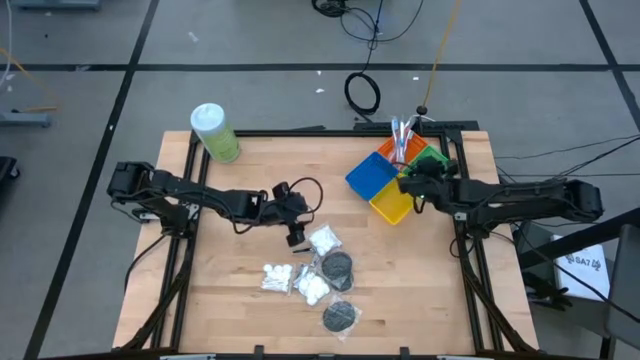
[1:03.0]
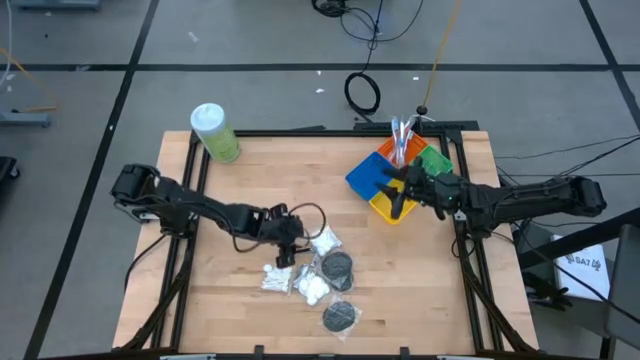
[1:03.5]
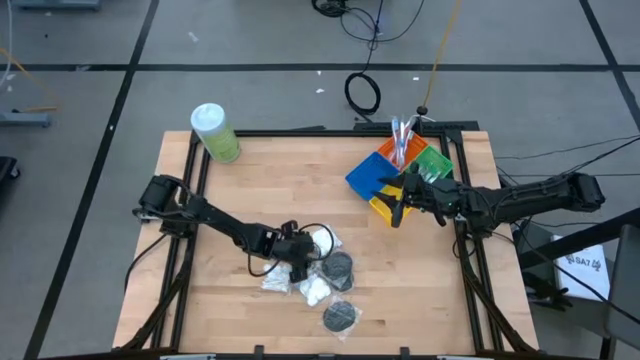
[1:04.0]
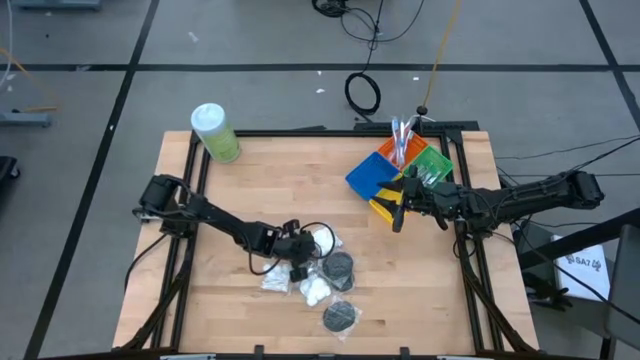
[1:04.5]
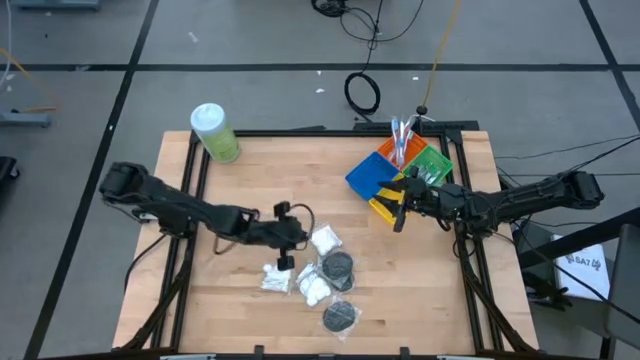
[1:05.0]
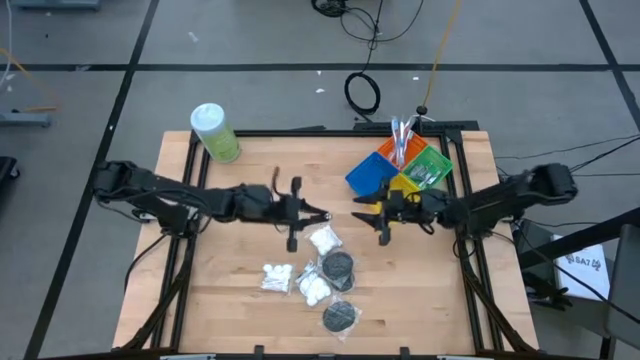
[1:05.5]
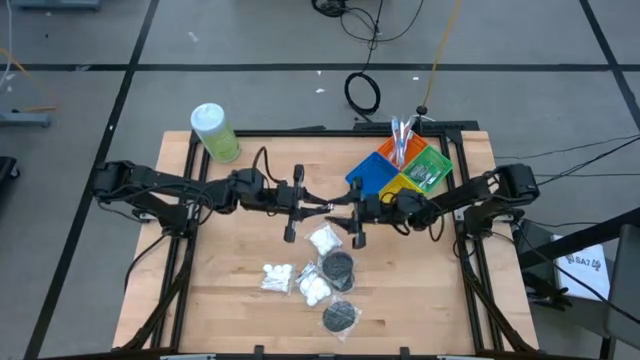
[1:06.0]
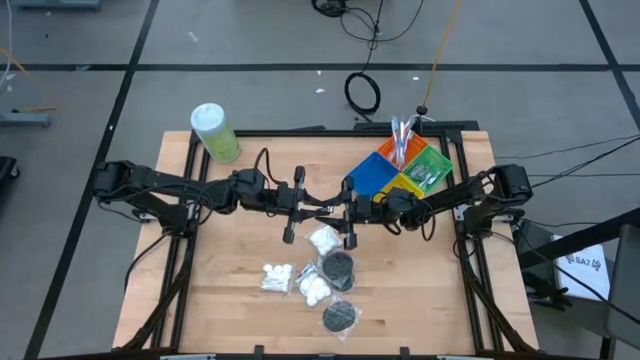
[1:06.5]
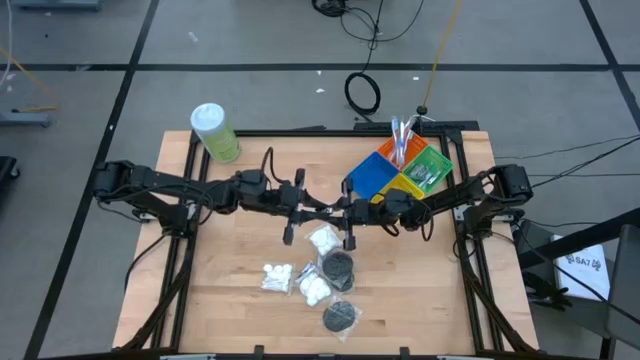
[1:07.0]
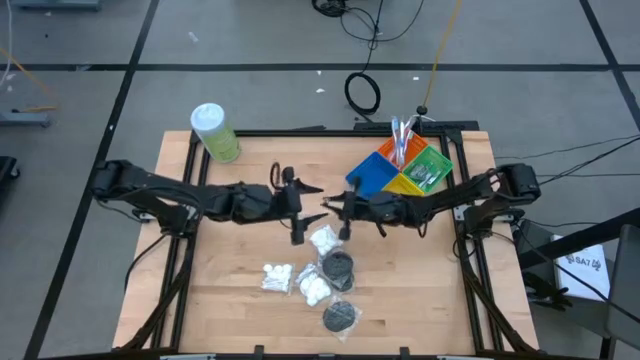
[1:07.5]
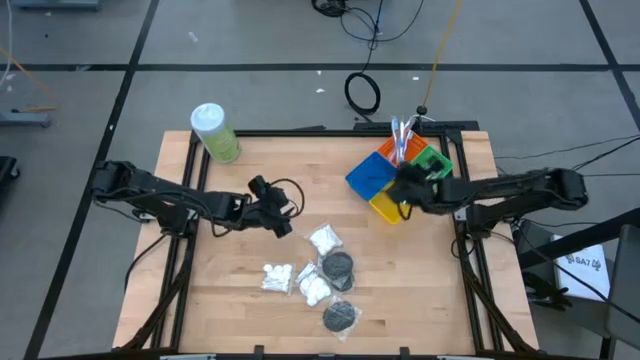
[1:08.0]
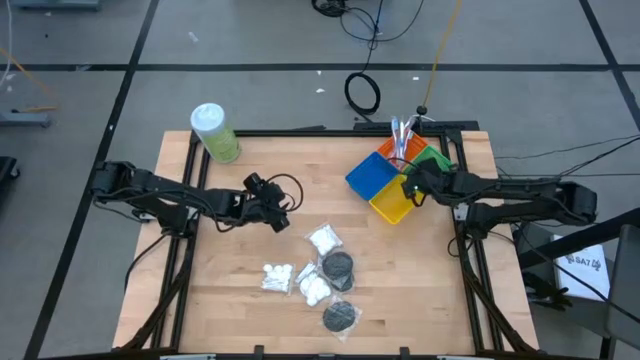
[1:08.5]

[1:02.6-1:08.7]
Task: Pick & Place Travel size toiletries
Put the nail cutter into the green bin

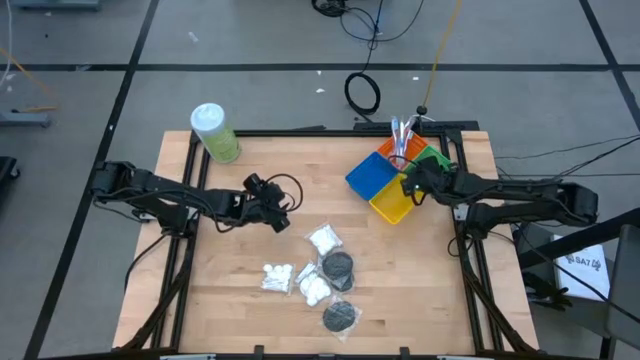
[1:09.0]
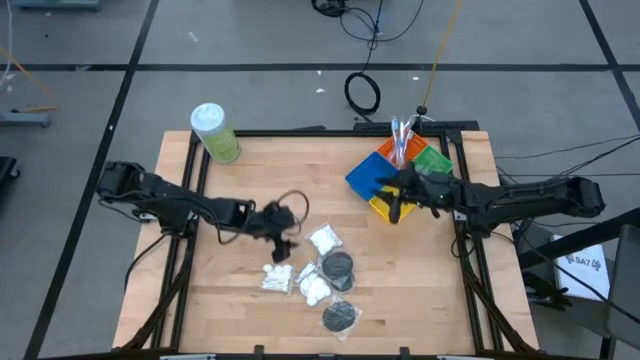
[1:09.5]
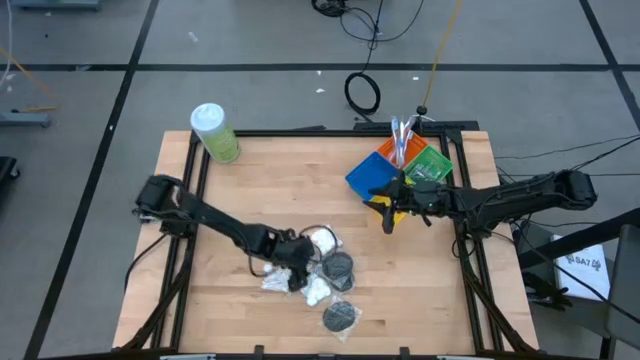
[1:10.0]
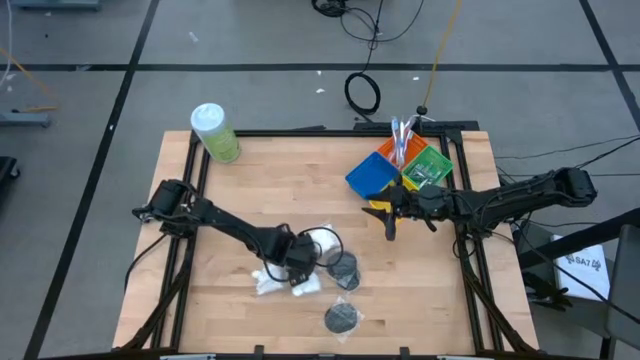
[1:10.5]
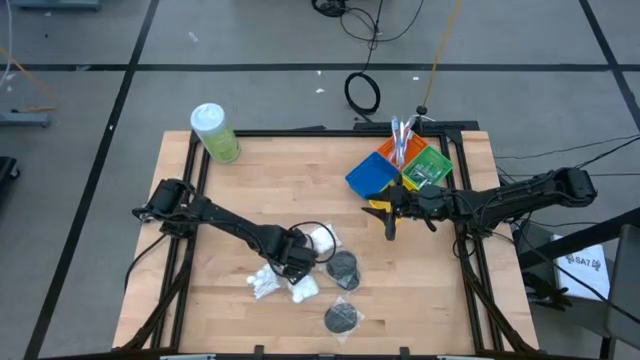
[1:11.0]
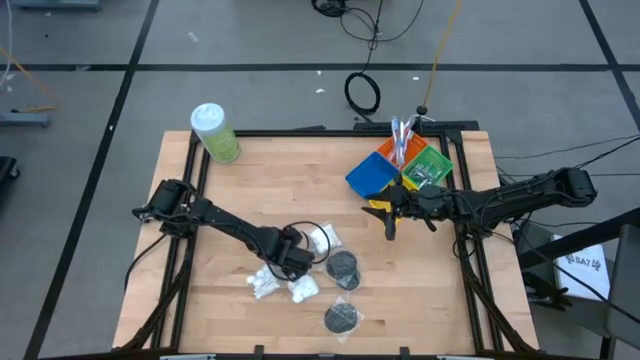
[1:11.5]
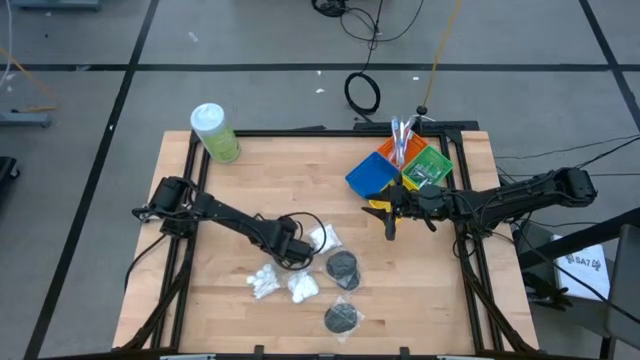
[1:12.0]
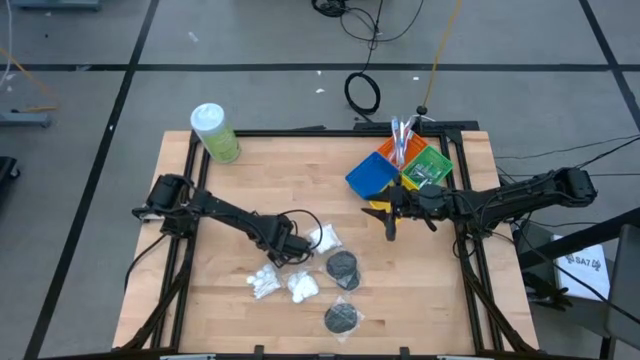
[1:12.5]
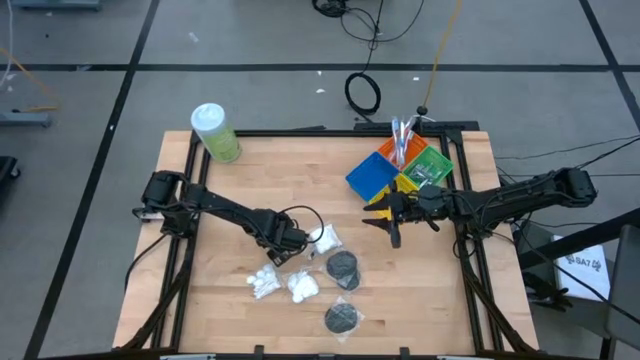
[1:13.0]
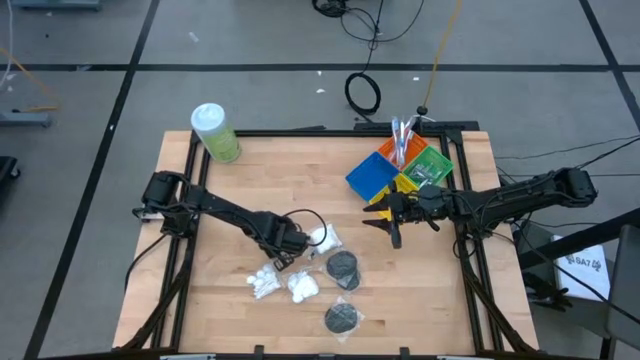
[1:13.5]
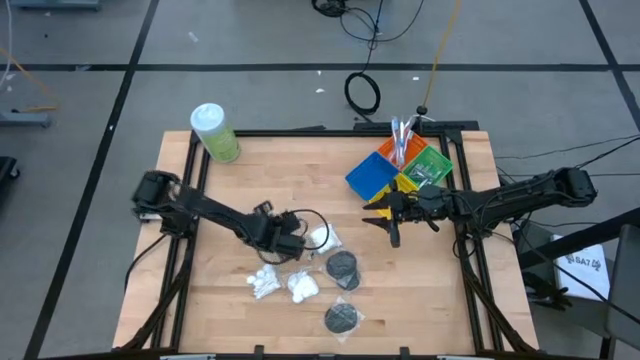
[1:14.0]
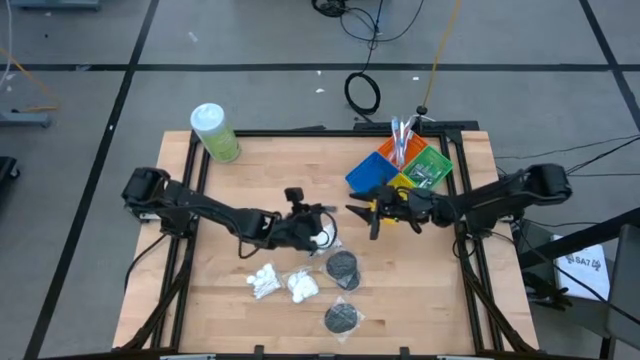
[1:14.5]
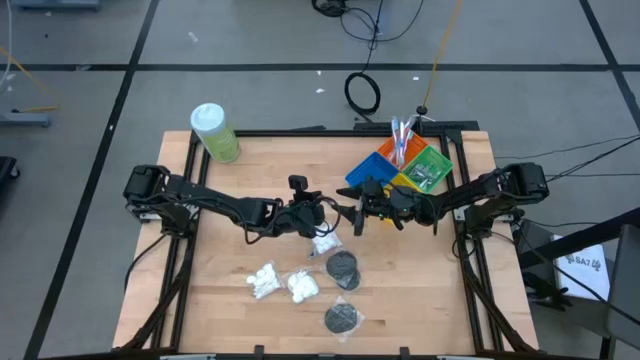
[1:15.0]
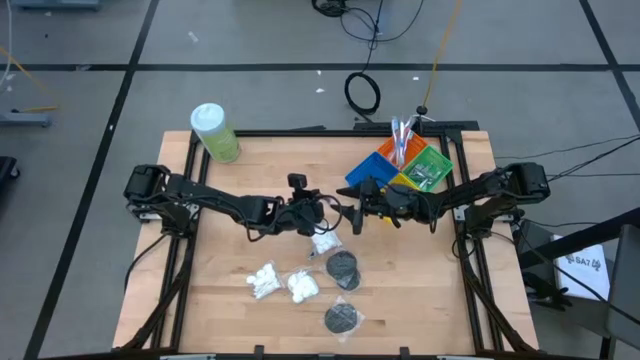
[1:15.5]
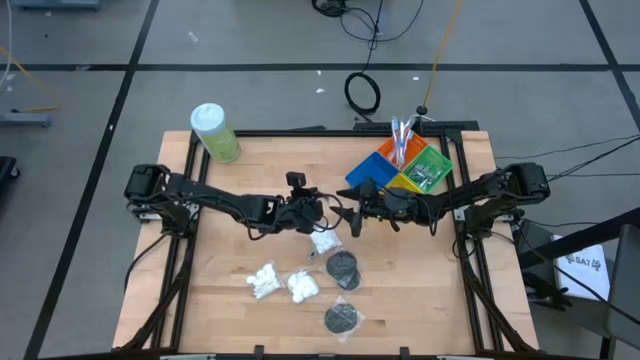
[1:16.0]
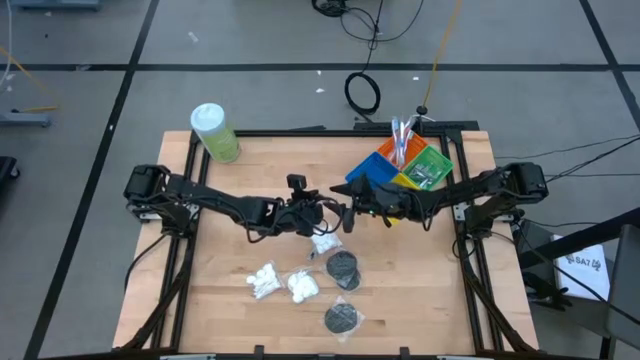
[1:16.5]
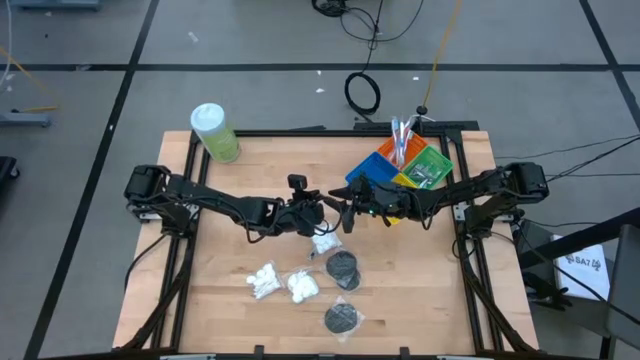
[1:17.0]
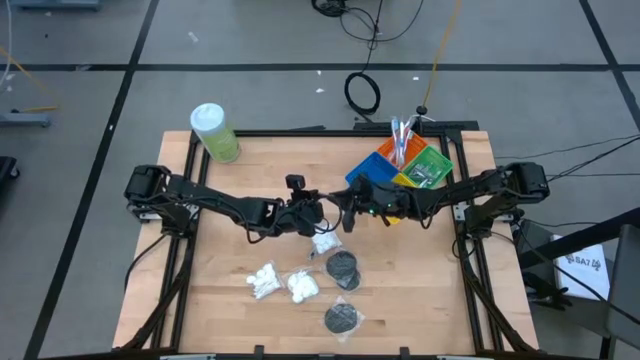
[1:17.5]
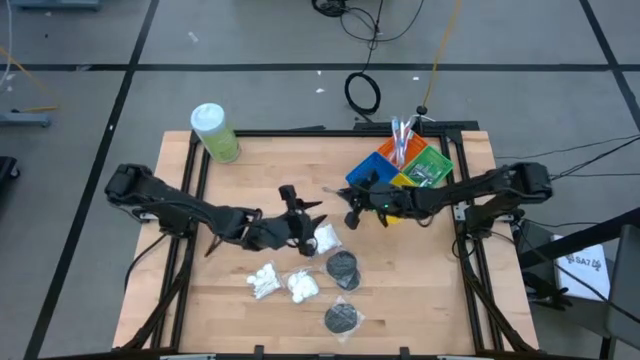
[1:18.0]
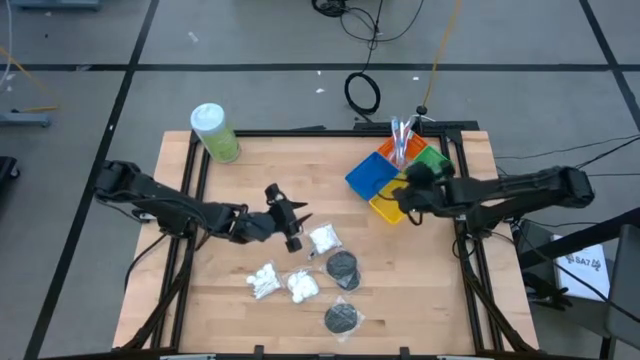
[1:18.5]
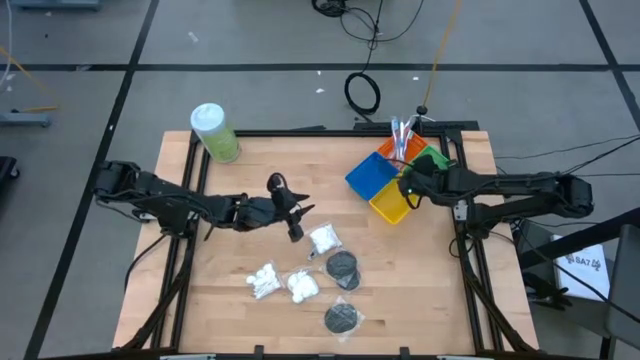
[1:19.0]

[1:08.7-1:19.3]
Put the nail cutter into the green bin

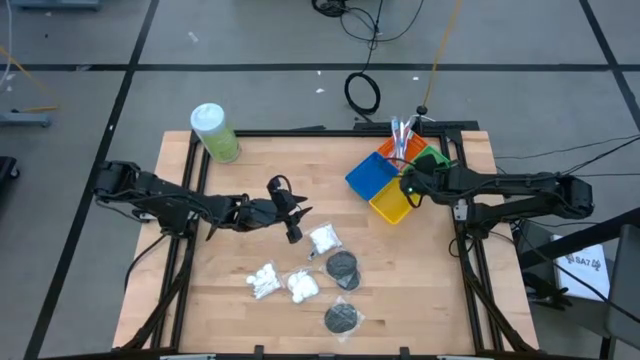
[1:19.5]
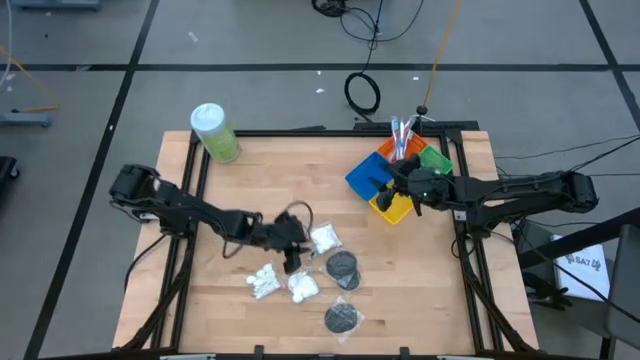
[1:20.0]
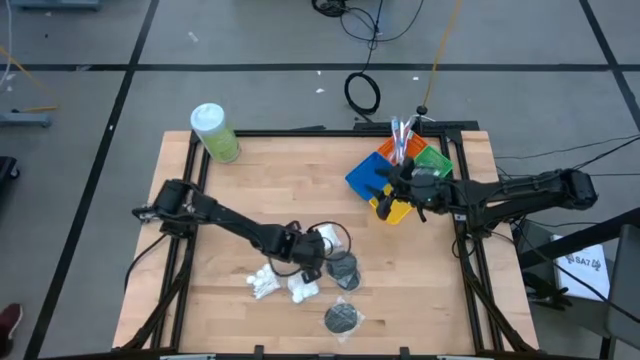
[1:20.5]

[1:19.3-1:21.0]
Put the nail cutter into the green bin

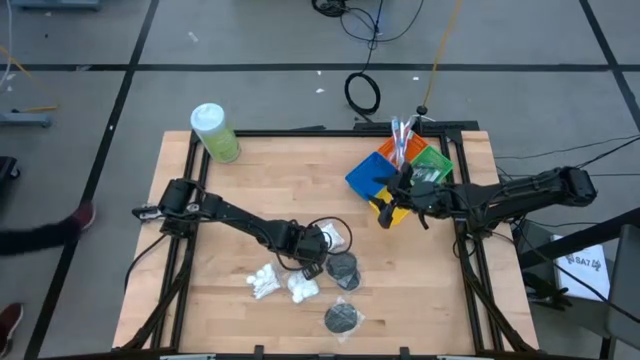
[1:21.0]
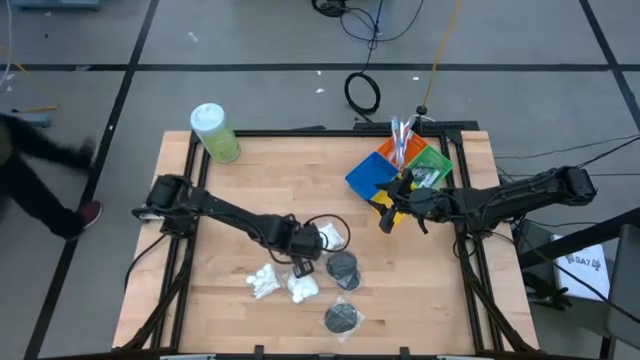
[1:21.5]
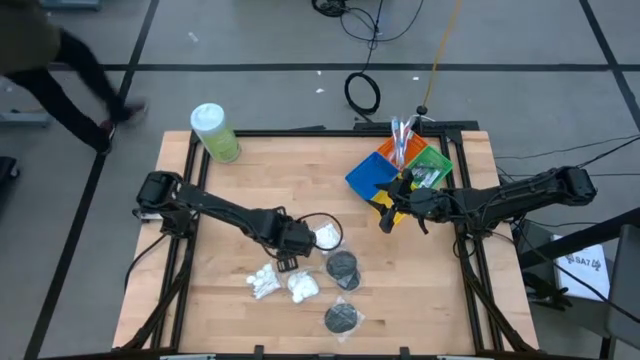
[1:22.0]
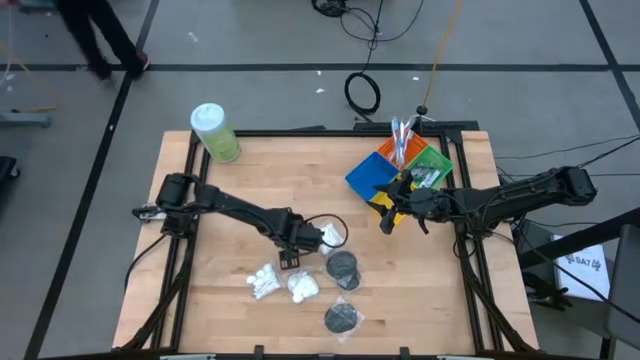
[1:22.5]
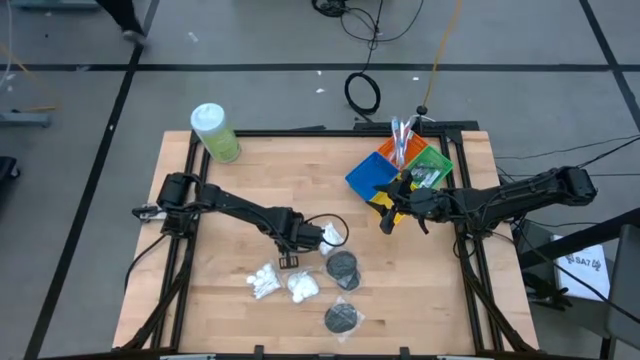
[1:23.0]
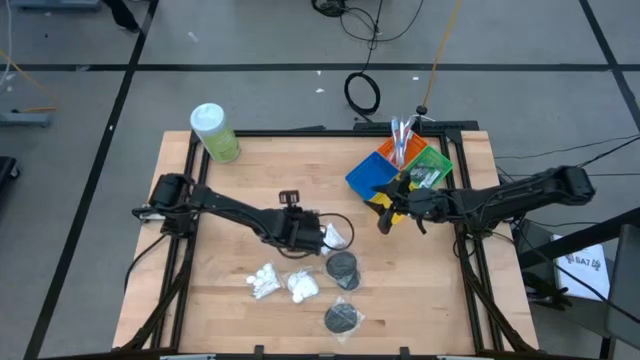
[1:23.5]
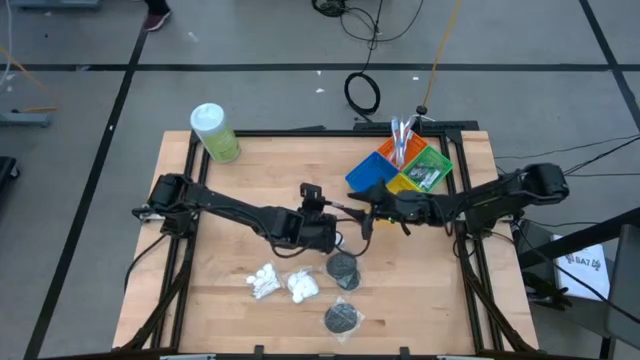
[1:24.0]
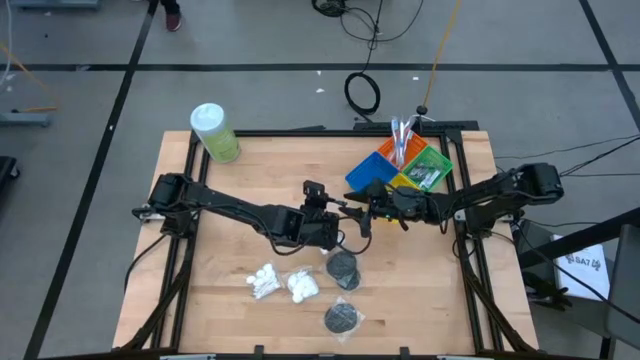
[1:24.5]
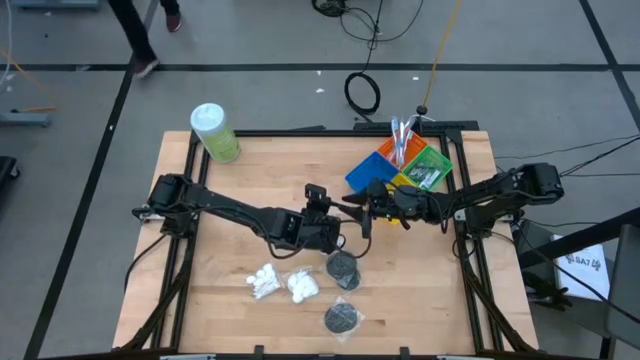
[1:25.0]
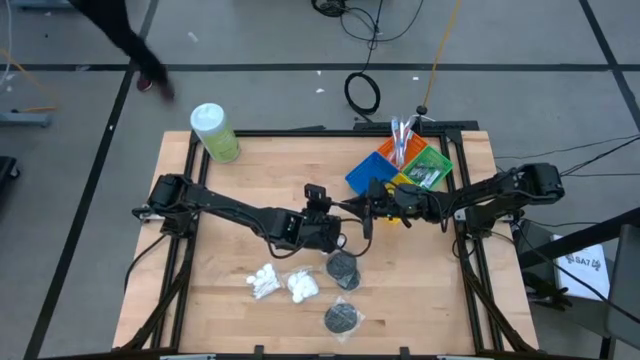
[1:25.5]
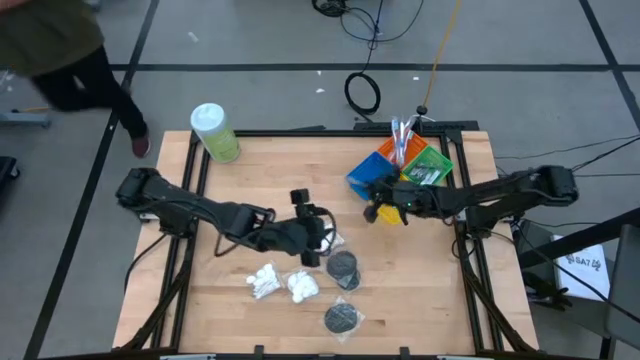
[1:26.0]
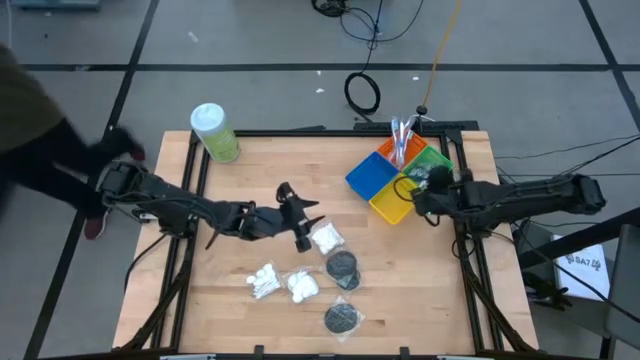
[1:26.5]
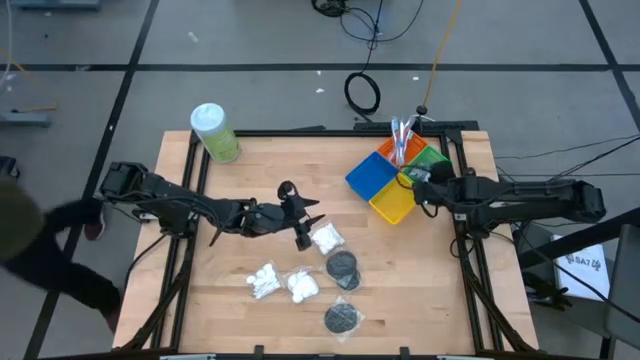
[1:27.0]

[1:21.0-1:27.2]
Put the nail cutter into the green bin
